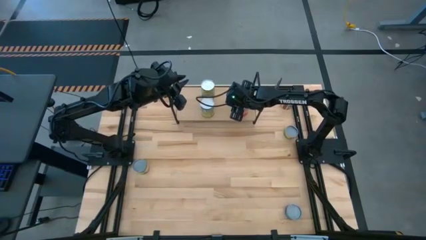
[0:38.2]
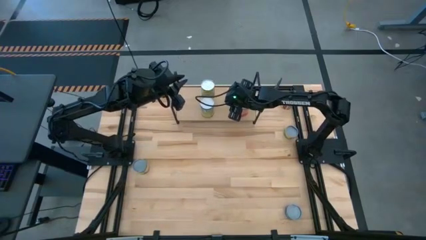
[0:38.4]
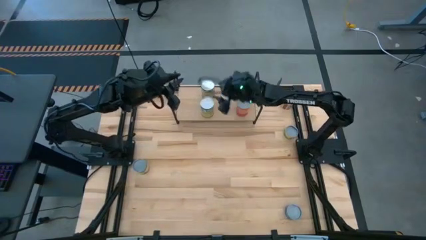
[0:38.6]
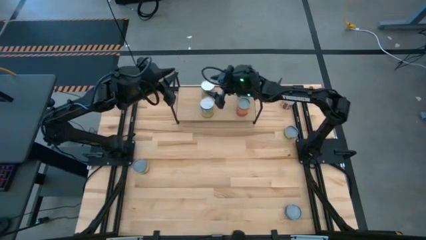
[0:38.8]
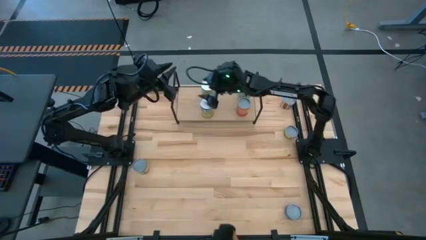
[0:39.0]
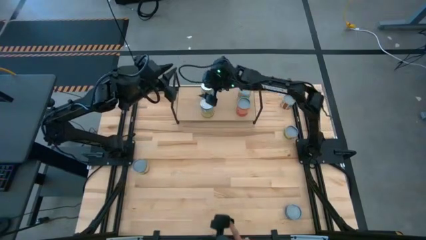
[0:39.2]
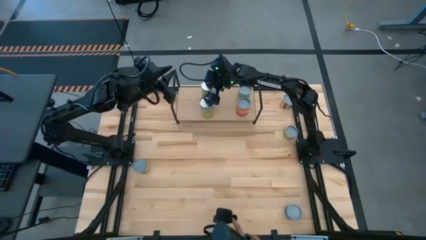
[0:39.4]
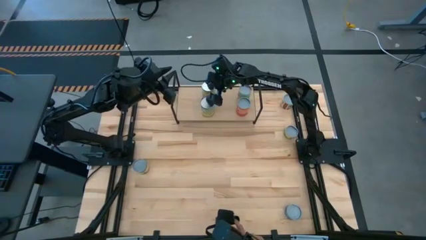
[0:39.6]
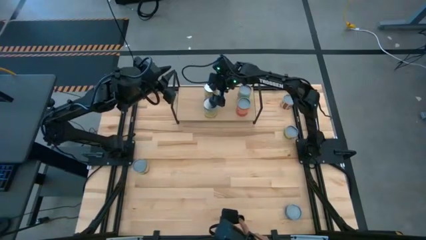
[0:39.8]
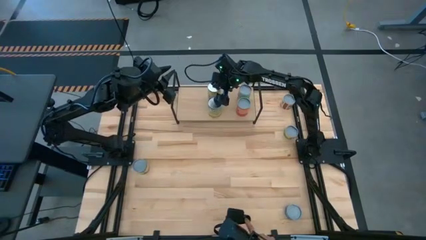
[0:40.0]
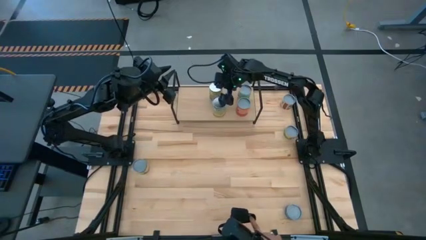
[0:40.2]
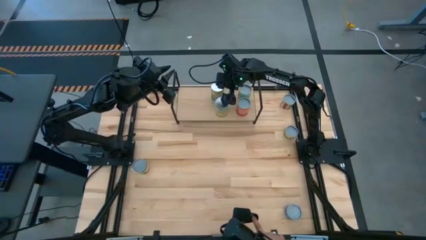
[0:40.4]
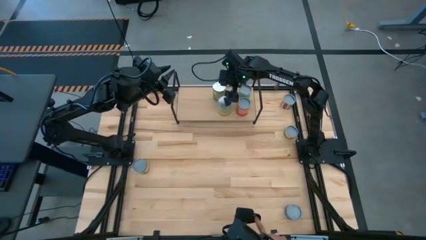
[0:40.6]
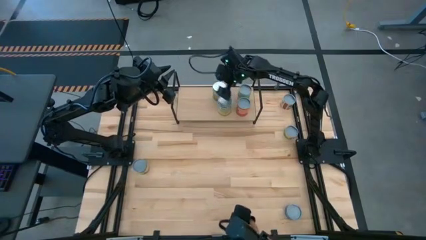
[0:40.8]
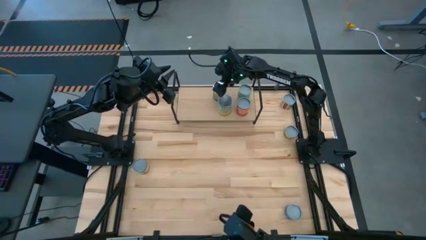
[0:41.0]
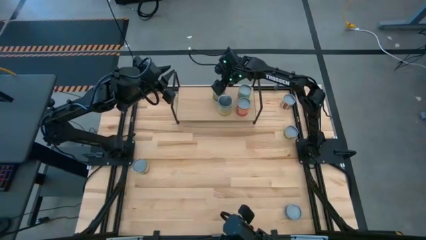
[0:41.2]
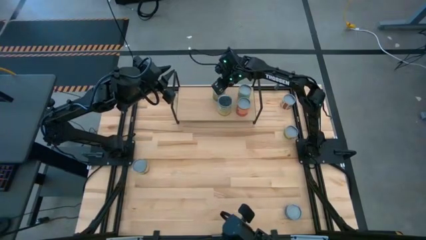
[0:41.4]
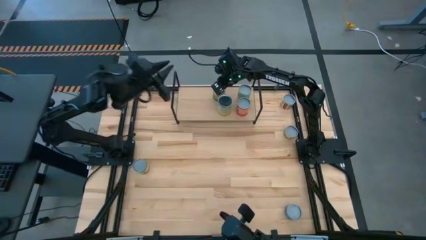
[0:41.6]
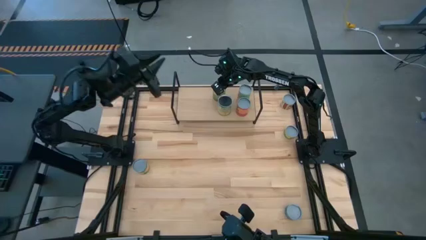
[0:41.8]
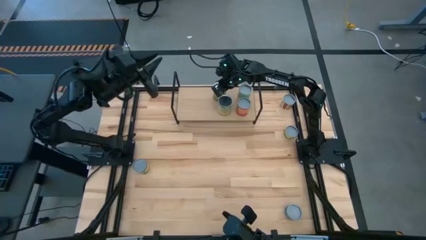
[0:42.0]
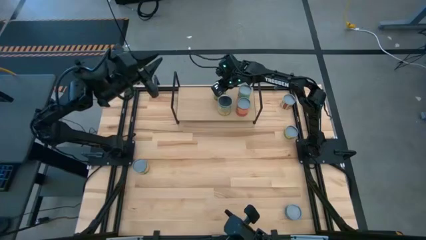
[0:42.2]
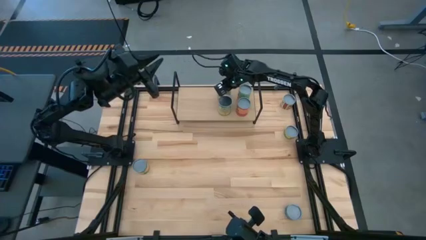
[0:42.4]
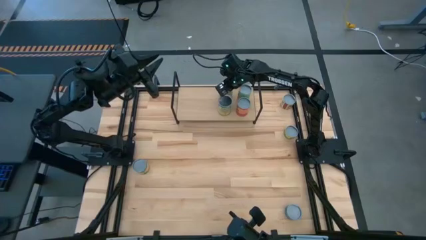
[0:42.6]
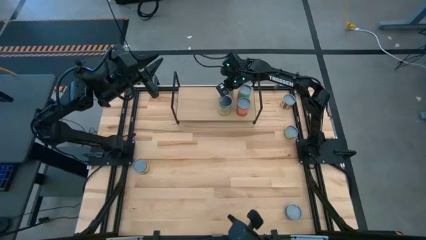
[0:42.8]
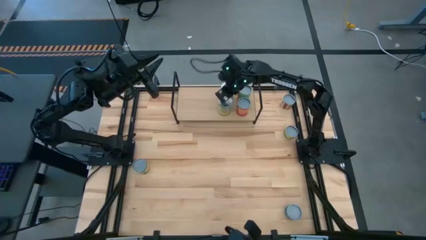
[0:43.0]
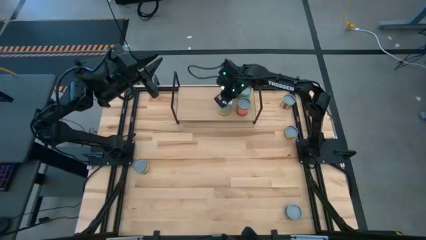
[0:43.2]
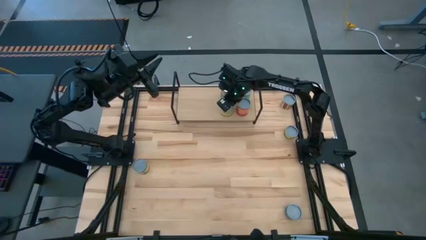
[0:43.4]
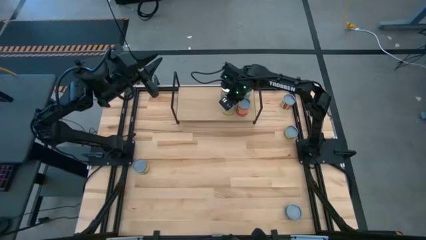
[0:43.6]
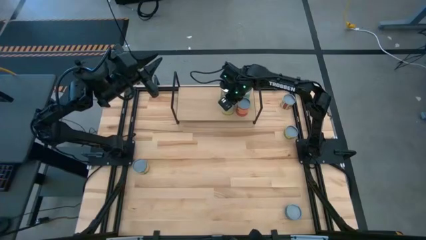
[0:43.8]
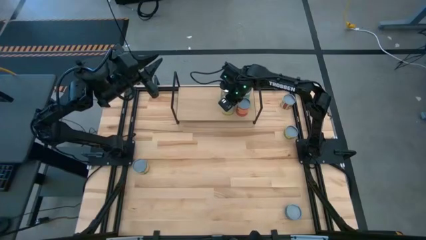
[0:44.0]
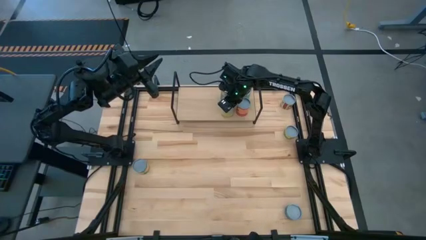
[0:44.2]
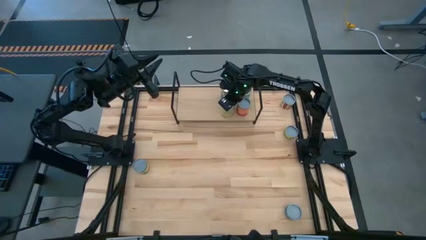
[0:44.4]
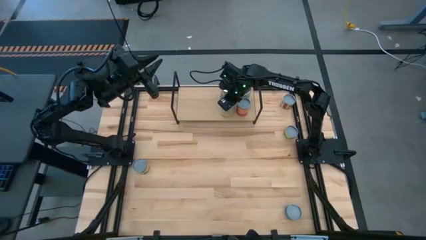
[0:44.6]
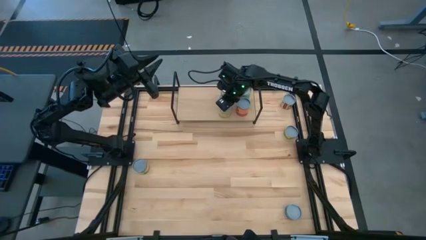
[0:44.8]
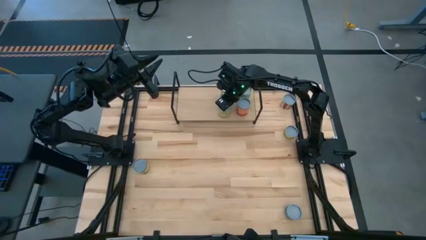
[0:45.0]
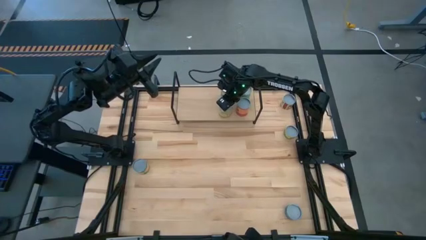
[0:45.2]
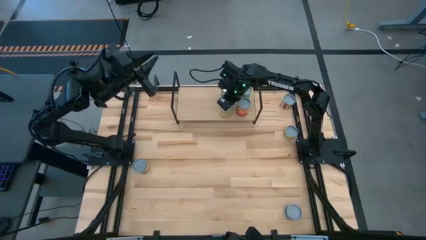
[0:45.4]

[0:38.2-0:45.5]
Task: Pick and place cans onto a shelf
Adjust the canned goods on the shelf

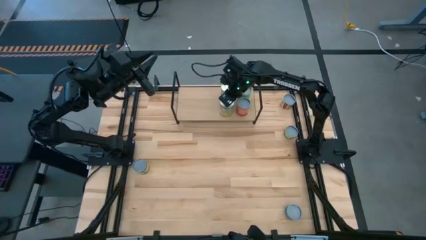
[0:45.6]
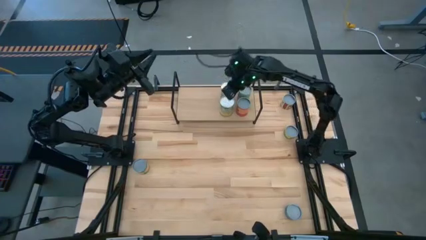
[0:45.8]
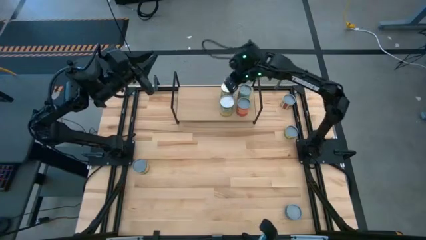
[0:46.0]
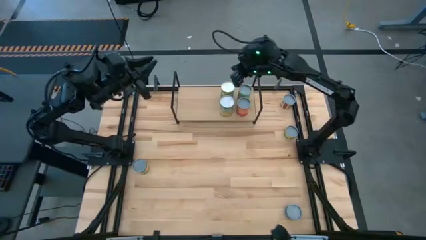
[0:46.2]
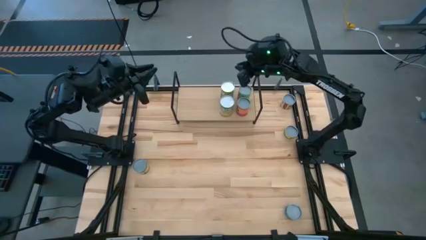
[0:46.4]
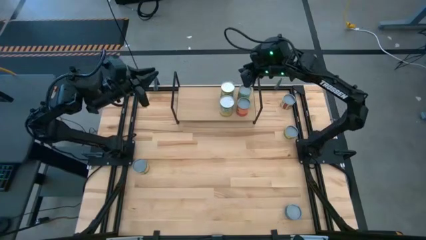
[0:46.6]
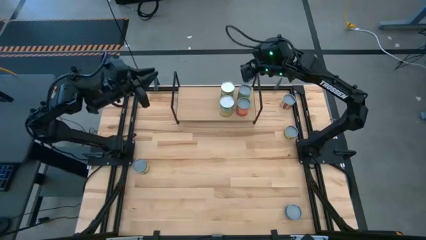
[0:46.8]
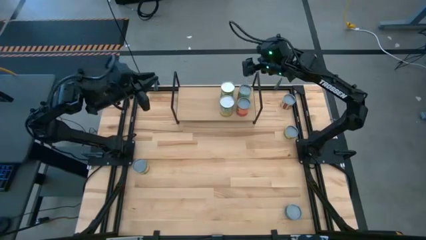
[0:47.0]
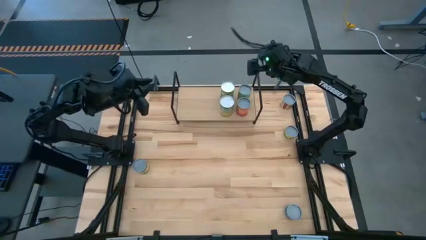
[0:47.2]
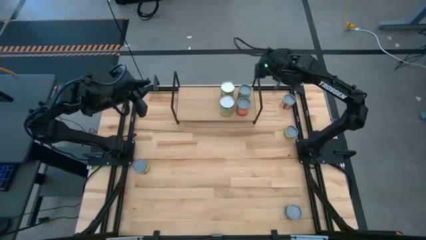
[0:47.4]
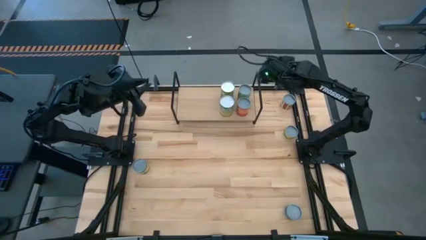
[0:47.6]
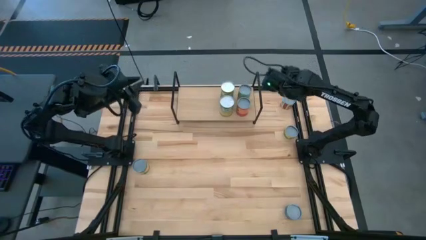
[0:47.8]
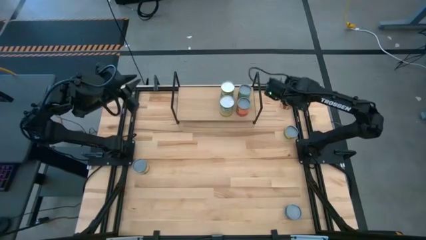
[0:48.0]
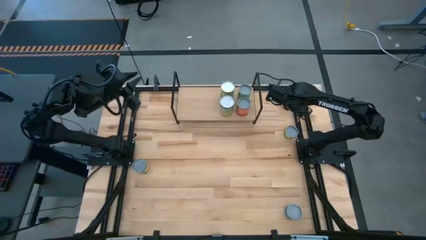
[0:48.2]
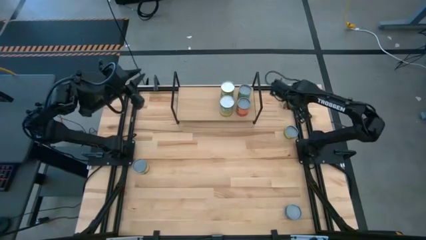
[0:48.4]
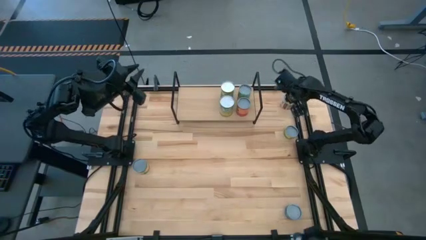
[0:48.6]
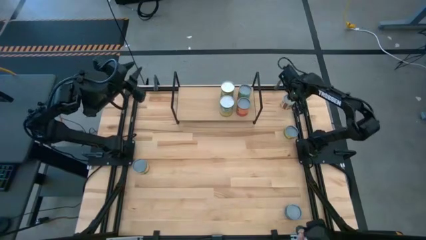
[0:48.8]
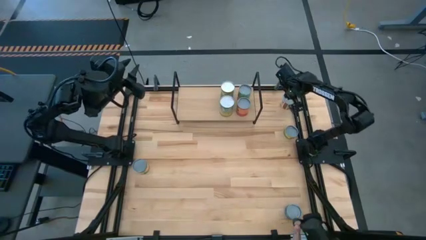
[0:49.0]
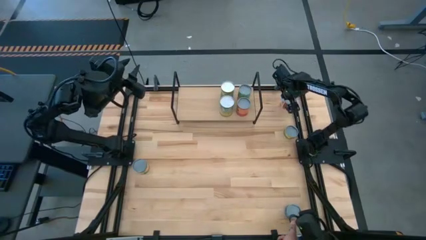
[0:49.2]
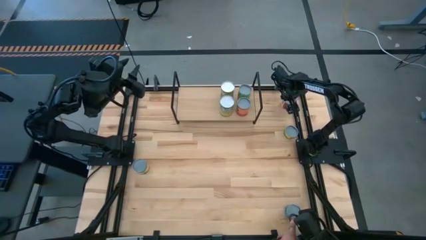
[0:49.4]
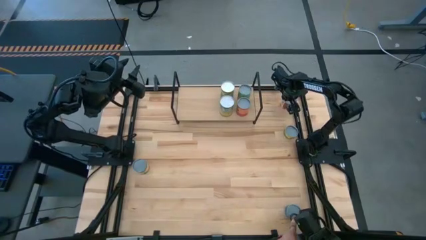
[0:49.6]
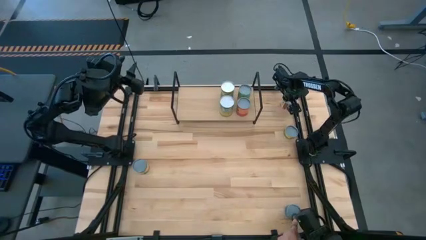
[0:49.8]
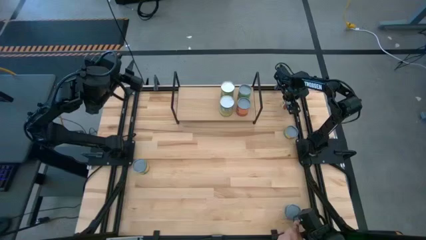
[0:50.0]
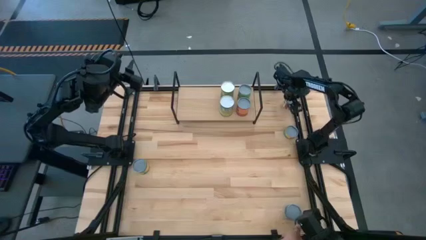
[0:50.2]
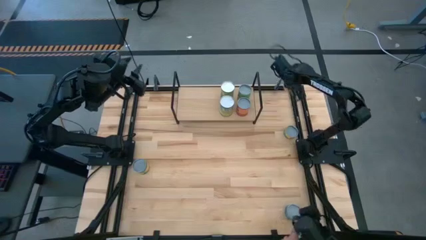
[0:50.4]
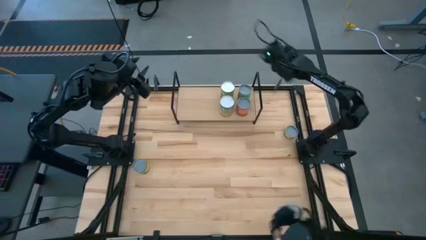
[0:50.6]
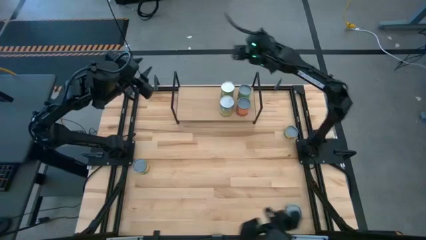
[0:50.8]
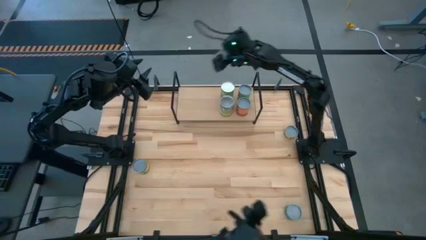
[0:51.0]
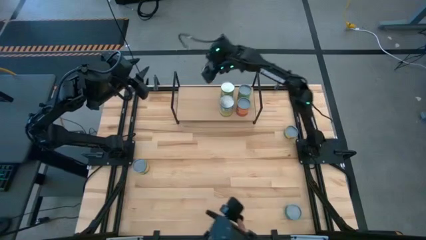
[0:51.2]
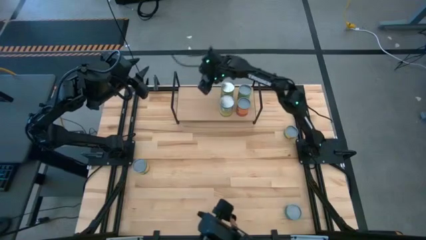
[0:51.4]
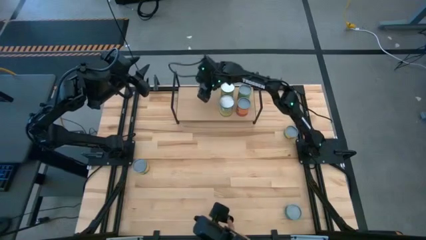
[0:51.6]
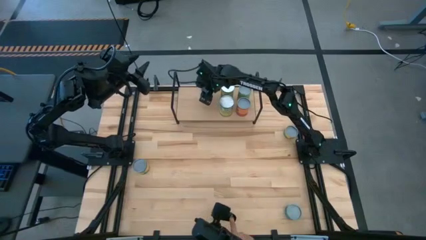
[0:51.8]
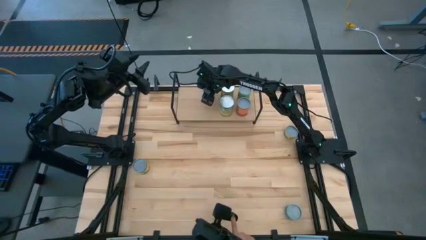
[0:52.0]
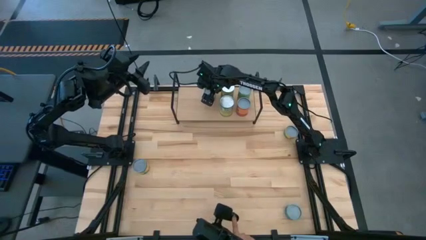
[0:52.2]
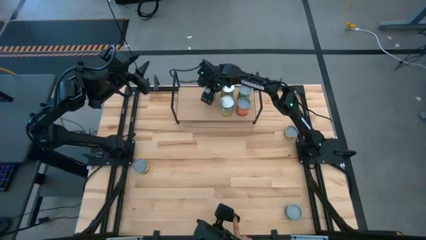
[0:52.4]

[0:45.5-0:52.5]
Put the canned tomatoes on the shelf
